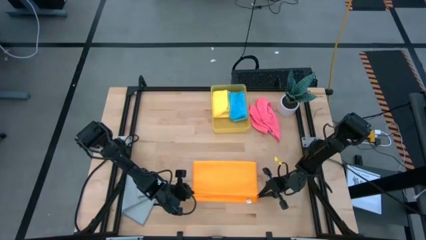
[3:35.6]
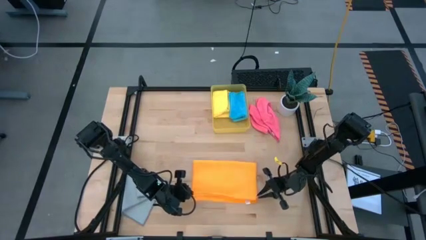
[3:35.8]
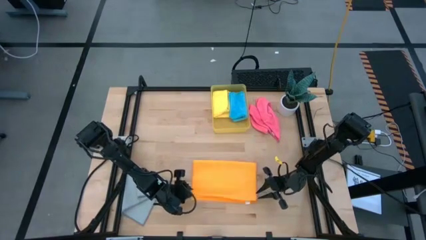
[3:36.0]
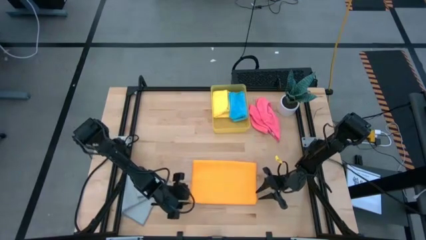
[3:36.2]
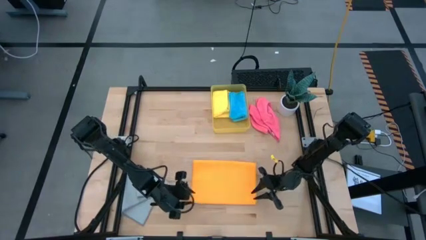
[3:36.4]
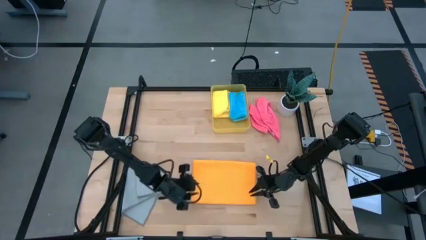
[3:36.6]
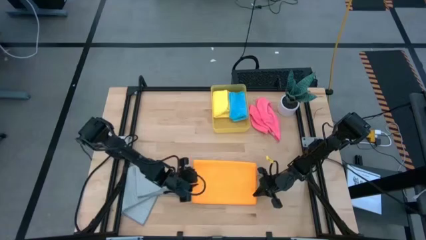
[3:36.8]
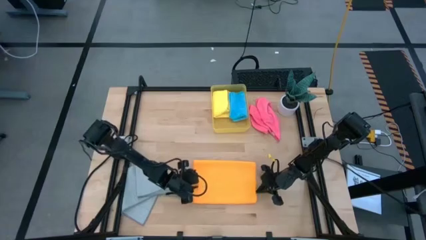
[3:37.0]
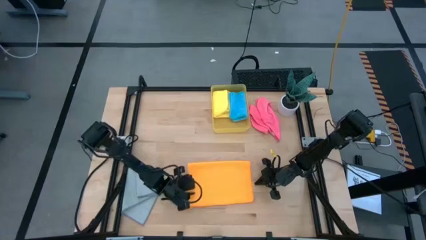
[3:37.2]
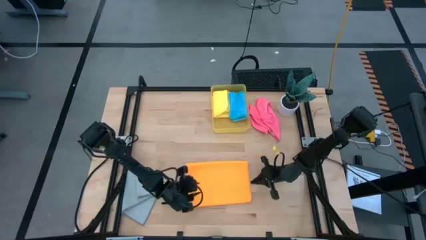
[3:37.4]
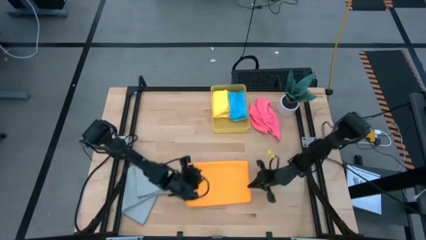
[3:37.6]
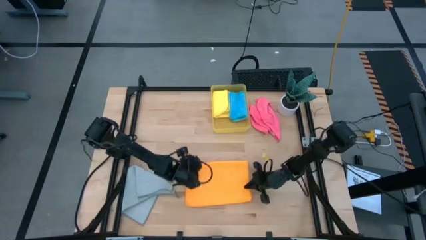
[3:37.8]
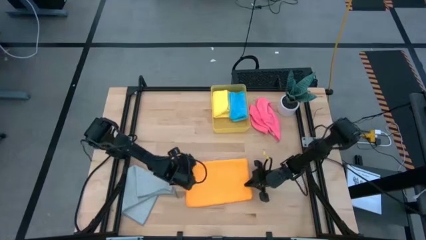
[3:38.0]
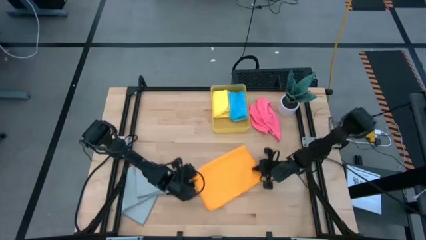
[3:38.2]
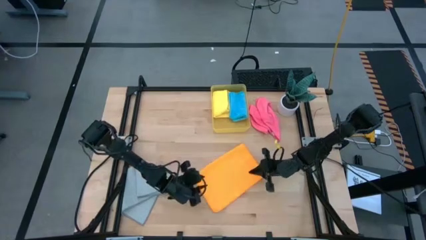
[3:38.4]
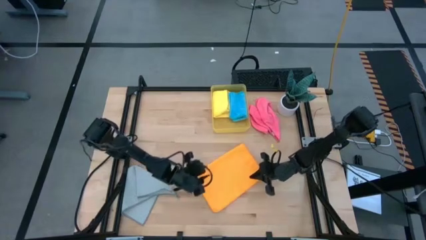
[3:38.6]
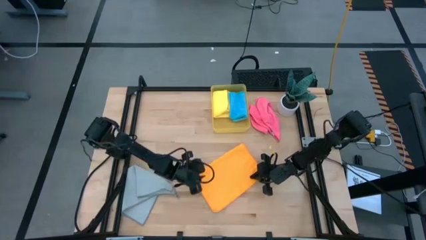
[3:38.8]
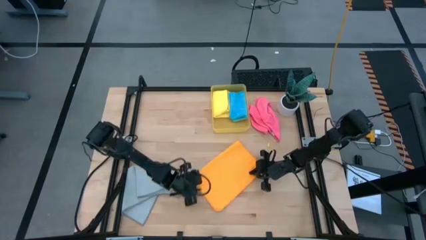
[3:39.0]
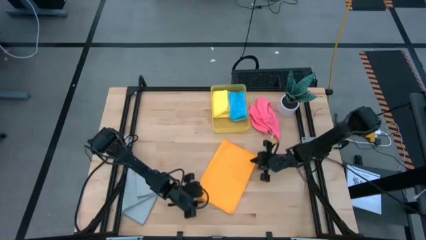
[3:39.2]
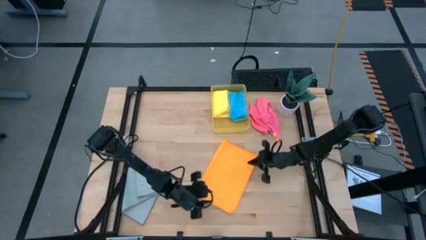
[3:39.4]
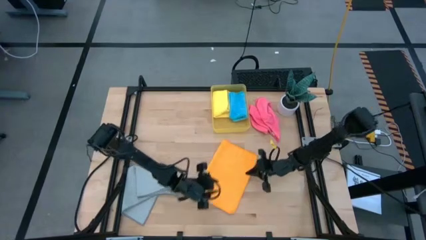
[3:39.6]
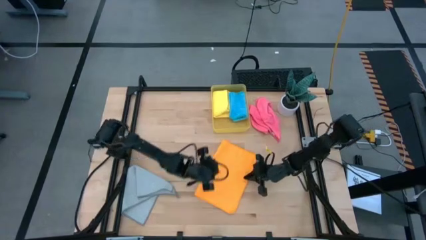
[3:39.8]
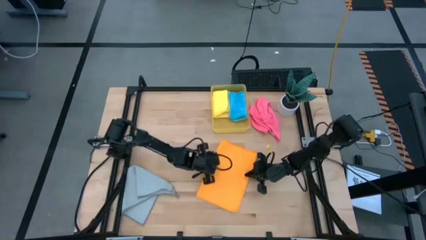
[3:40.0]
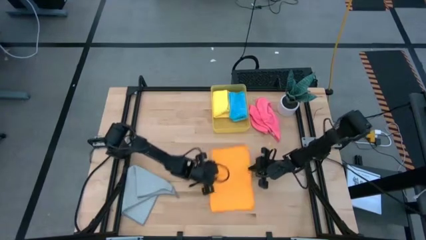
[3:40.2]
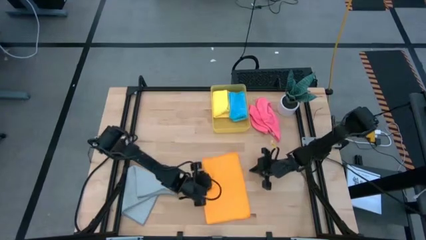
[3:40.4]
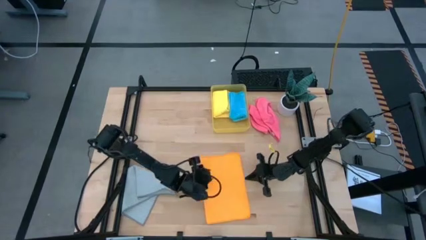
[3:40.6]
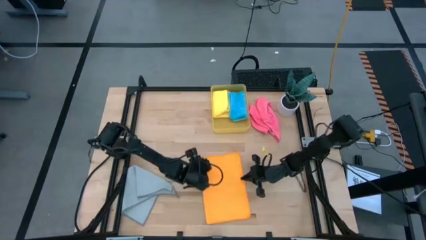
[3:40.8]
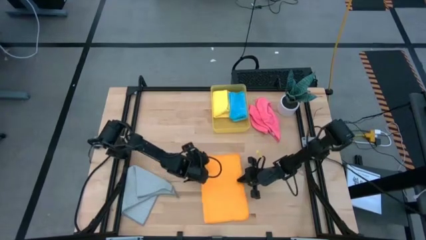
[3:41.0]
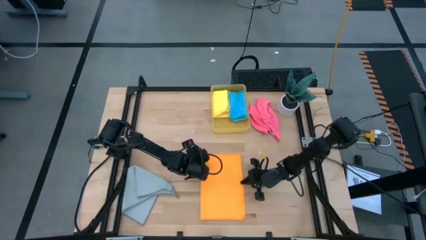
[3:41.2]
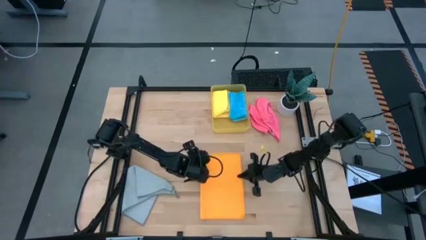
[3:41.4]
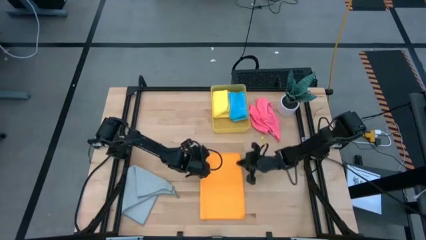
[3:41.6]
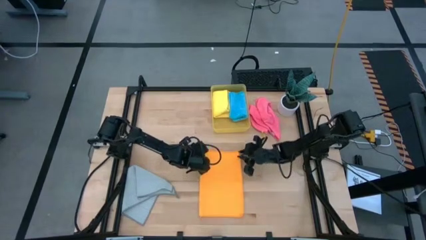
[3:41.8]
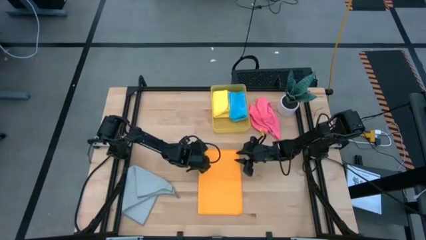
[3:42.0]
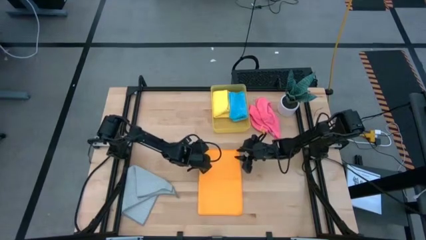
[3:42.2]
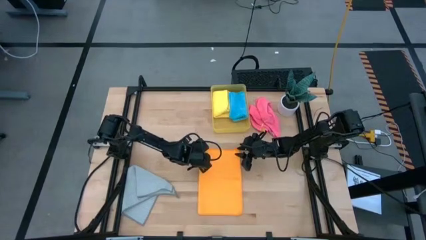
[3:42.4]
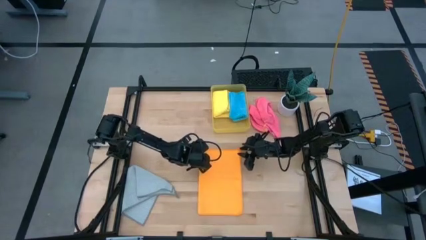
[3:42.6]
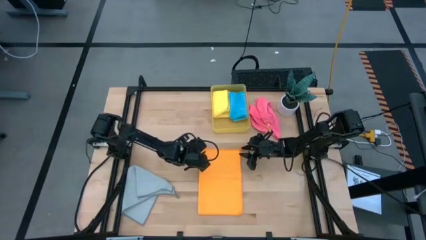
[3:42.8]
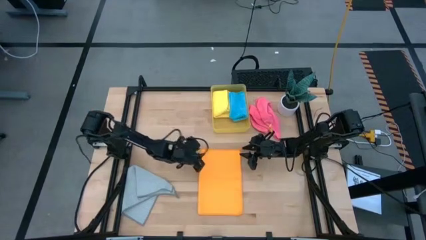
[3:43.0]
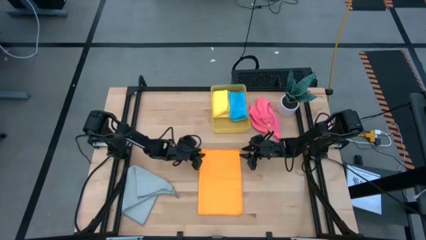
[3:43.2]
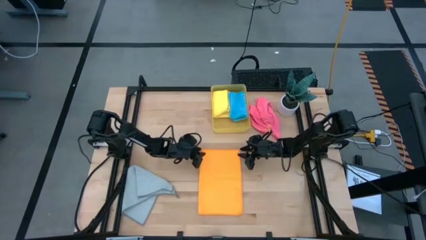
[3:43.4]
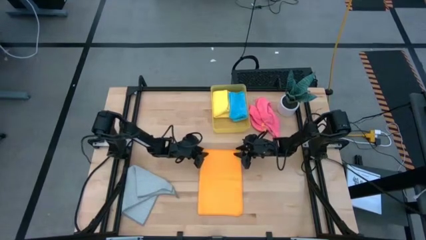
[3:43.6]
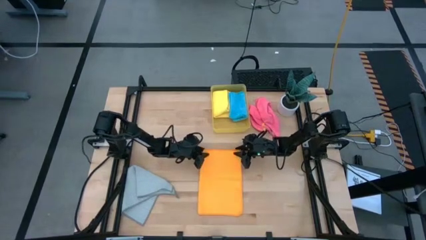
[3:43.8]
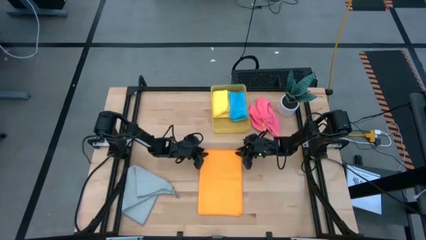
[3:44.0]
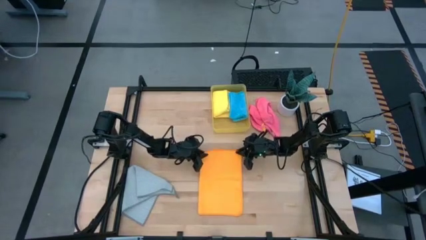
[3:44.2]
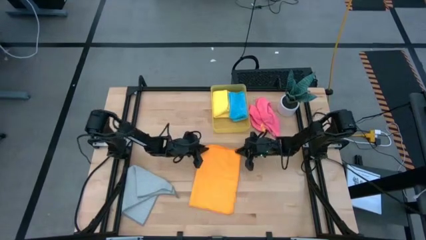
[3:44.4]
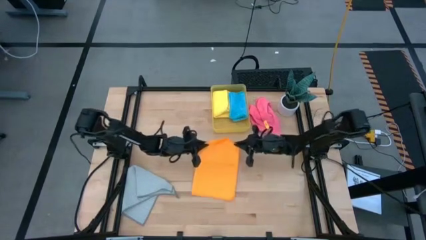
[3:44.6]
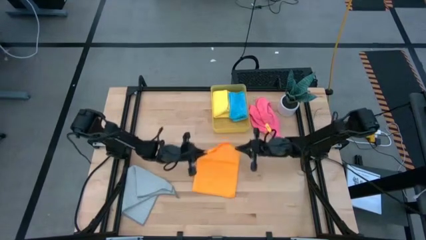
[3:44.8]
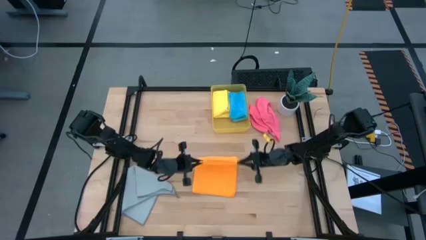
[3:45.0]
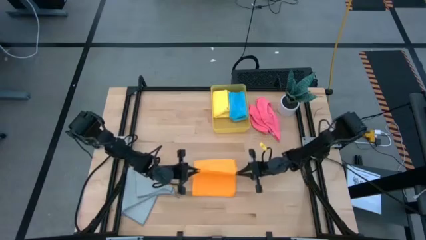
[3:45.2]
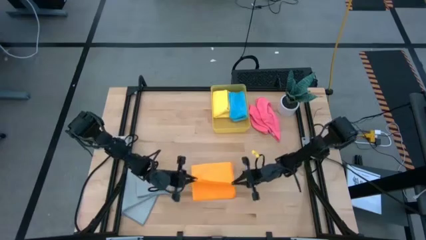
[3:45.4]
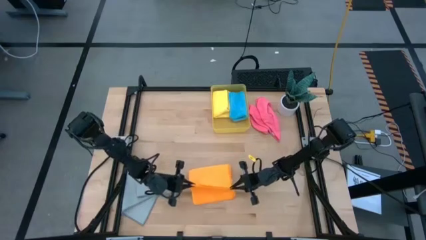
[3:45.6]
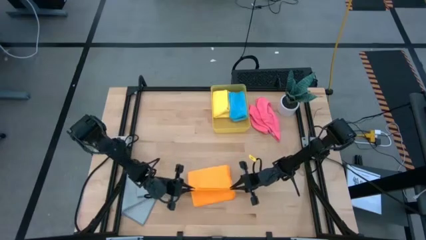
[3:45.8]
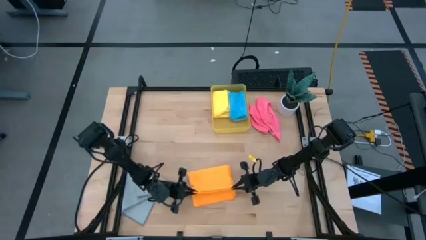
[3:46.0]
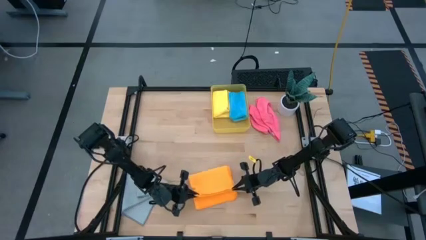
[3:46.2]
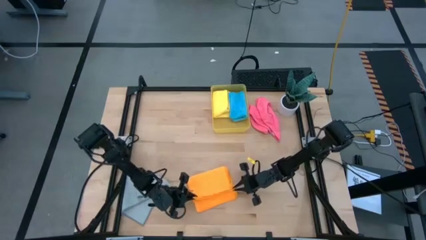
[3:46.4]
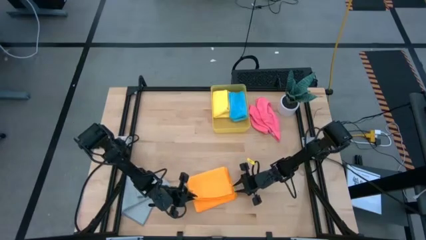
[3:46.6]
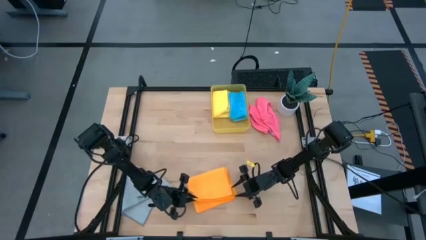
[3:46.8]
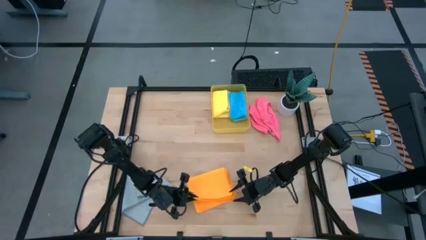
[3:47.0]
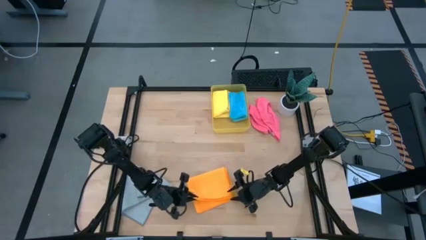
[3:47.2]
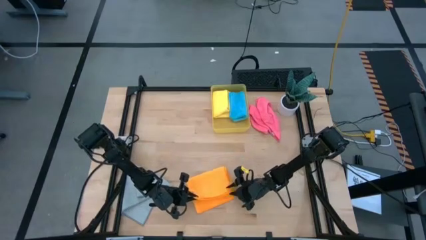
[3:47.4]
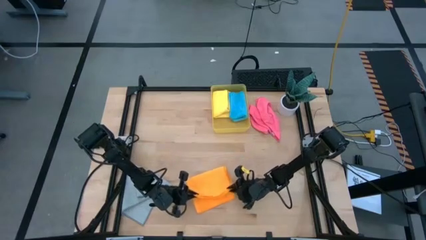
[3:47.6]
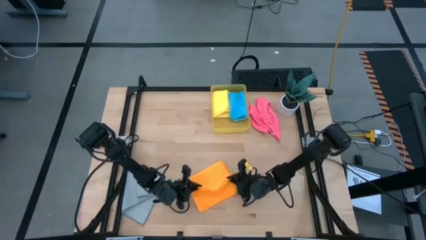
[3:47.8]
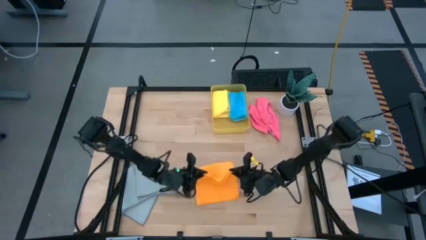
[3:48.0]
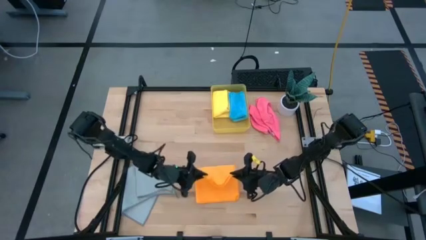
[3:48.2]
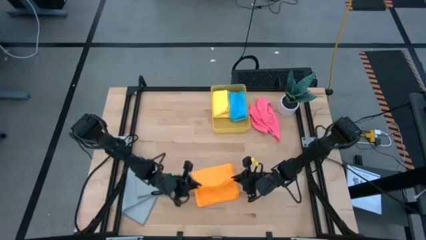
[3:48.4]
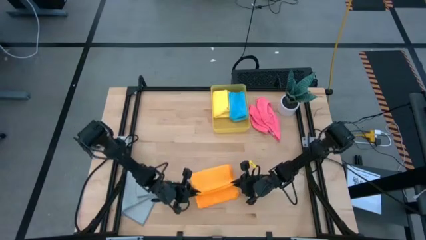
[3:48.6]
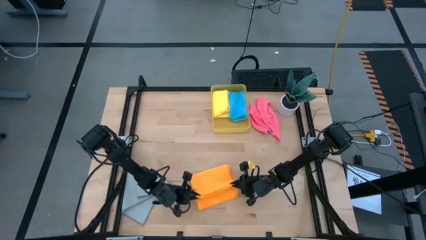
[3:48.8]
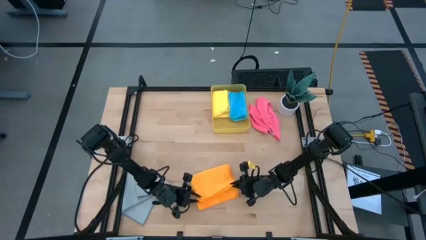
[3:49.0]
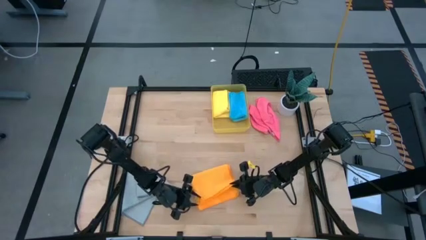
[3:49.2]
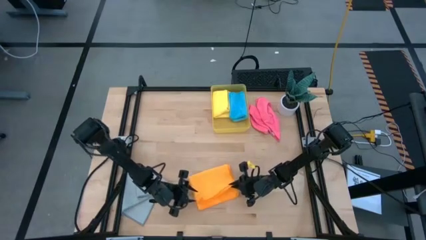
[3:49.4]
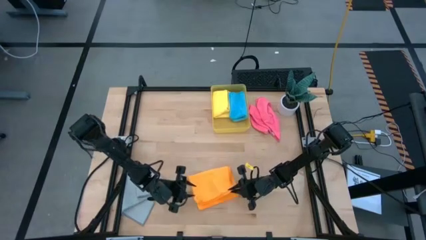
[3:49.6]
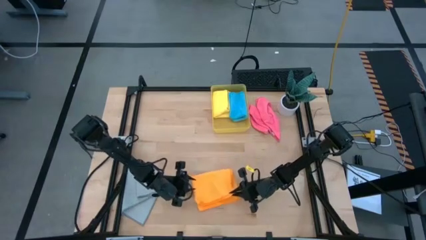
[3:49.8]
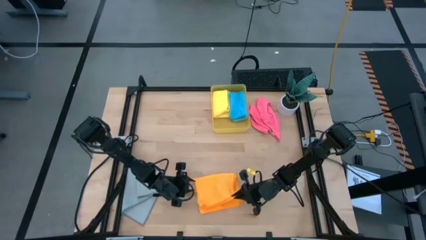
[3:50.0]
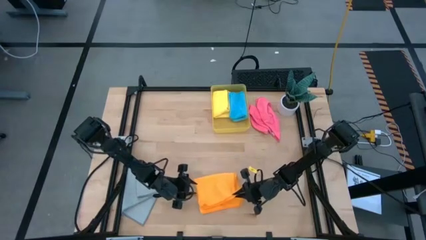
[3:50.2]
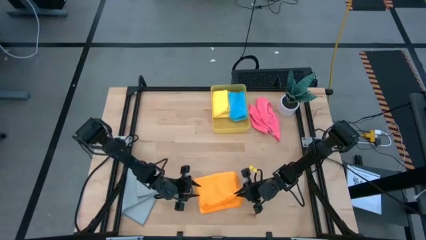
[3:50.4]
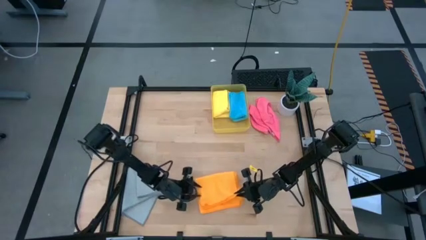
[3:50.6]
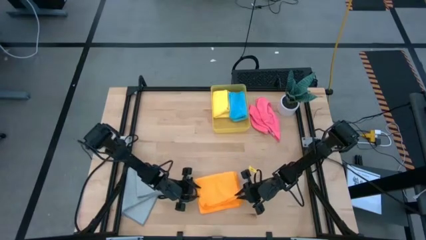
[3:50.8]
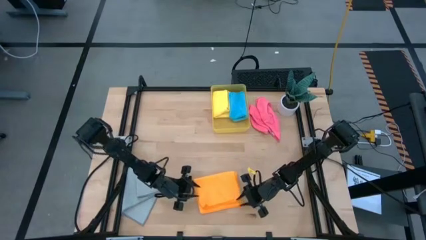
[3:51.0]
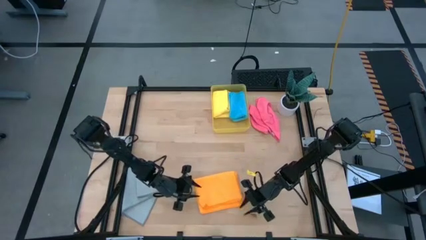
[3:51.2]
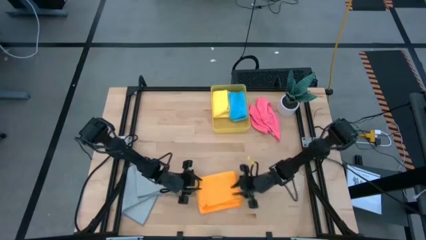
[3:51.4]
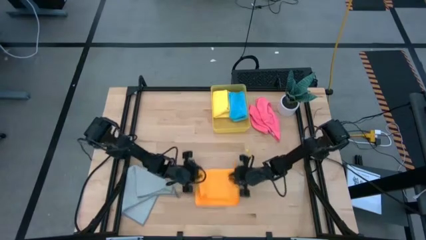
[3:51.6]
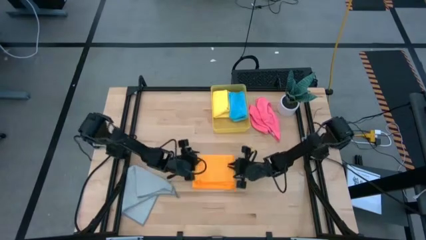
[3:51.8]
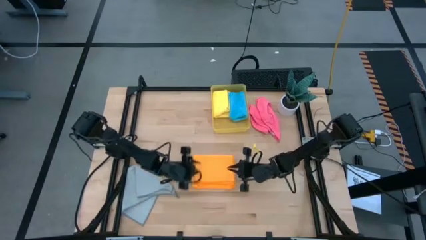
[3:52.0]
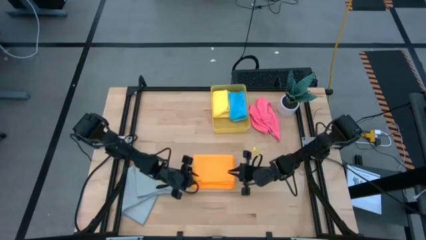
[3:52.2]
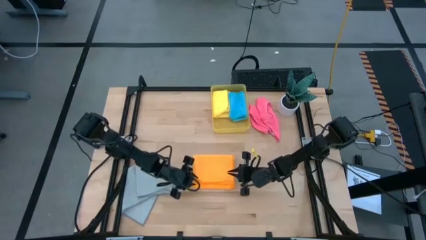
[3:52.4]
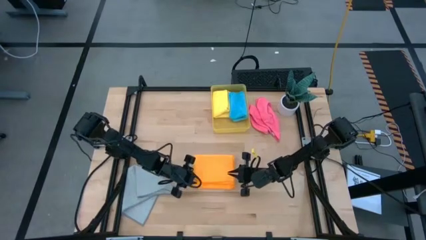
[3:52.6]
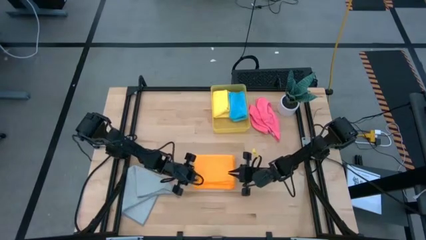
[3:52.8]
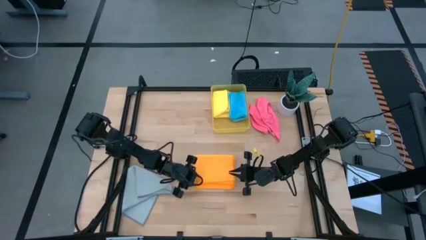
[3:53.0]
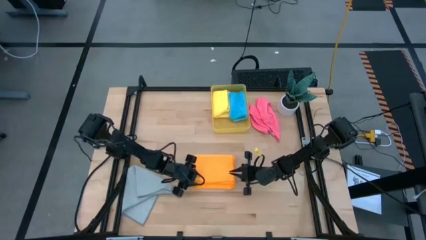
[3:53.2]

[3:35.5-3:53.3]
Task: Fold microfiber towels
Fold the orange microfiber towel
